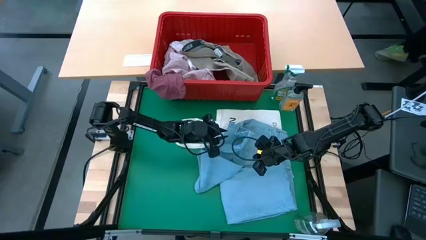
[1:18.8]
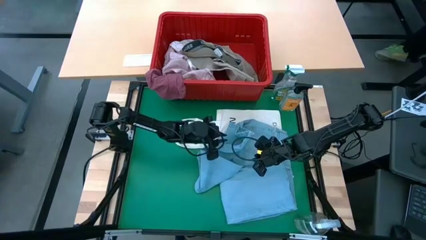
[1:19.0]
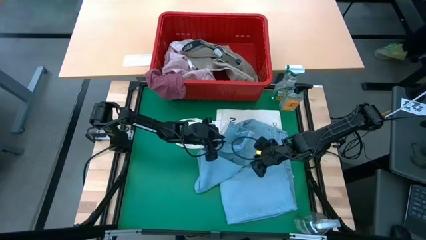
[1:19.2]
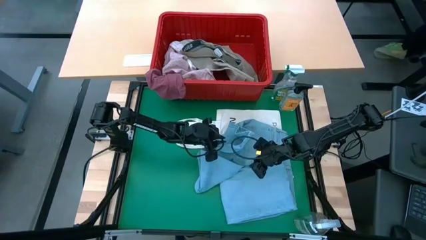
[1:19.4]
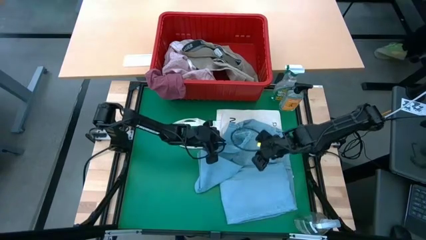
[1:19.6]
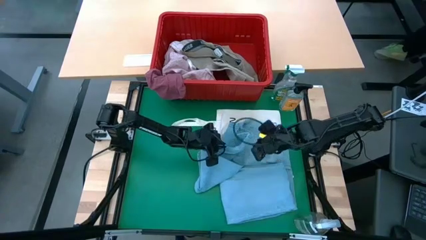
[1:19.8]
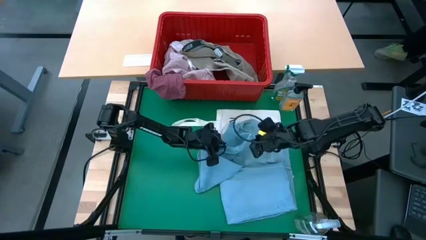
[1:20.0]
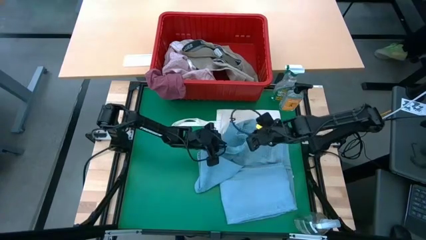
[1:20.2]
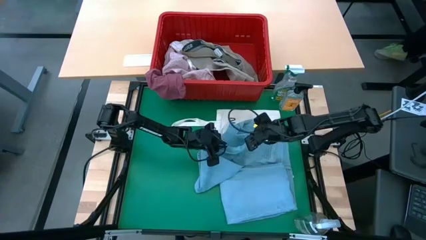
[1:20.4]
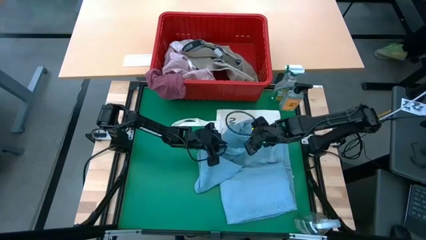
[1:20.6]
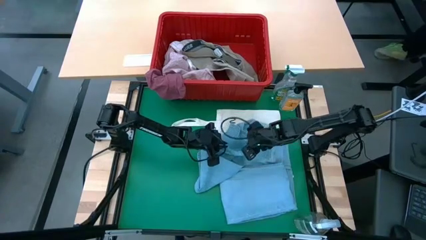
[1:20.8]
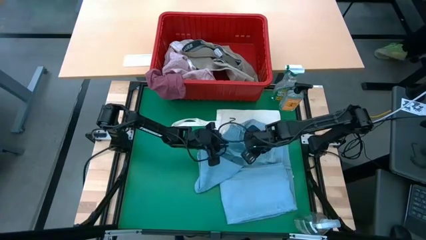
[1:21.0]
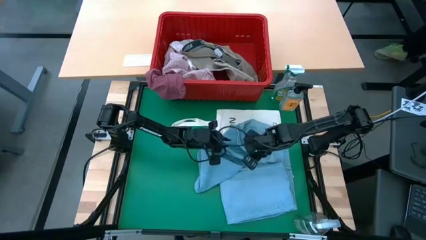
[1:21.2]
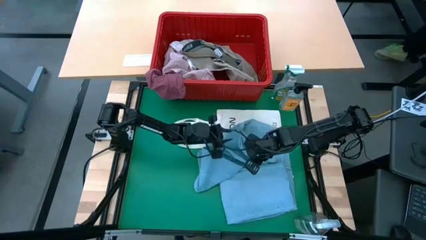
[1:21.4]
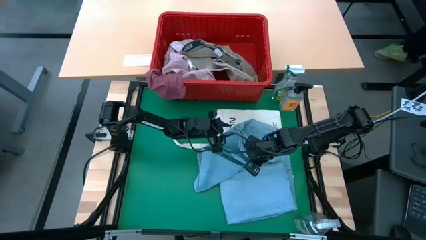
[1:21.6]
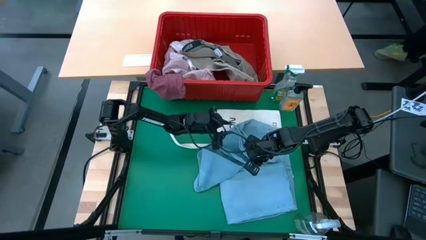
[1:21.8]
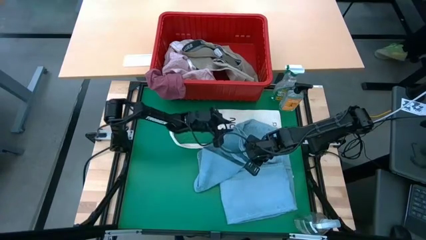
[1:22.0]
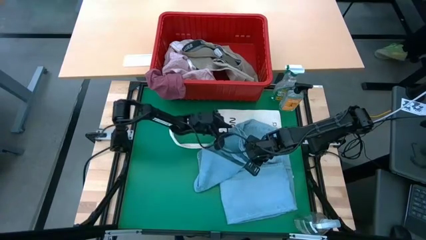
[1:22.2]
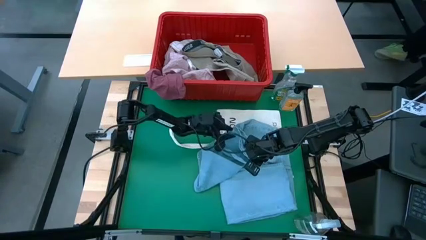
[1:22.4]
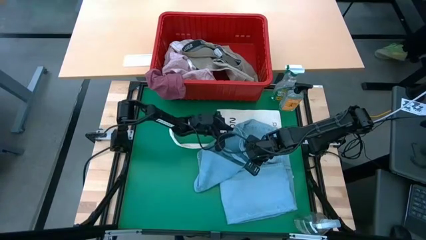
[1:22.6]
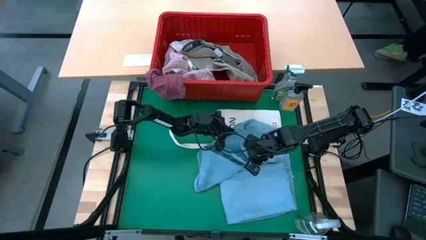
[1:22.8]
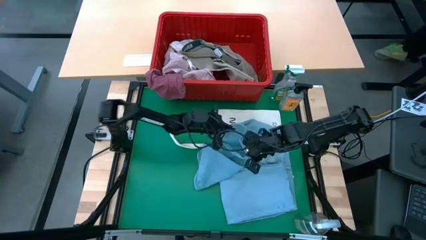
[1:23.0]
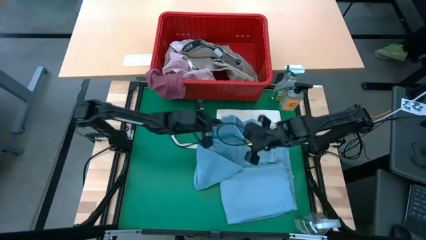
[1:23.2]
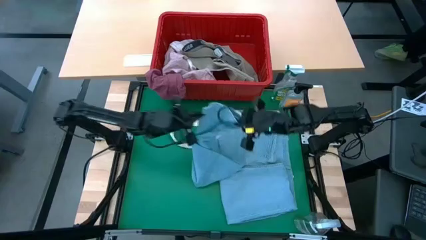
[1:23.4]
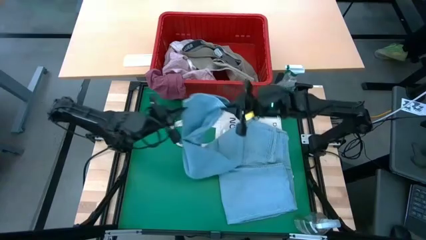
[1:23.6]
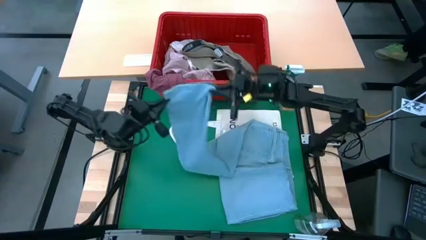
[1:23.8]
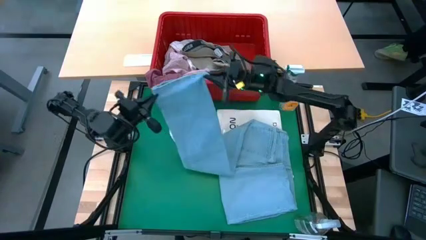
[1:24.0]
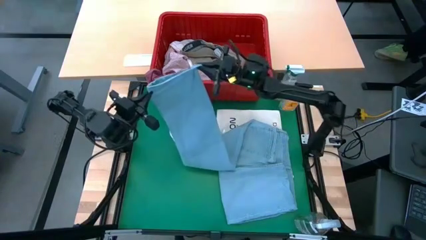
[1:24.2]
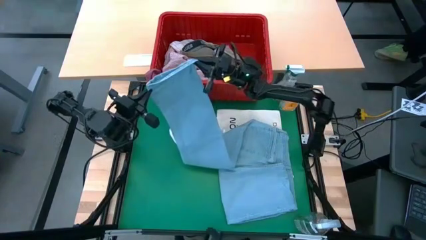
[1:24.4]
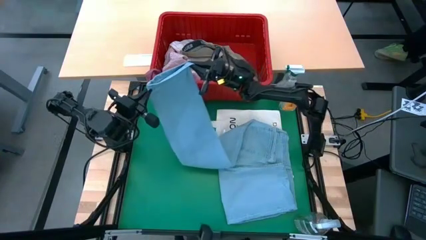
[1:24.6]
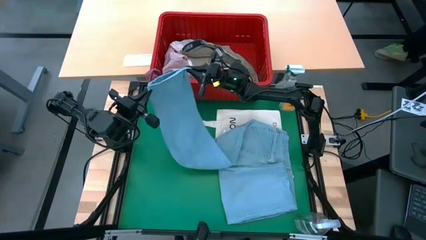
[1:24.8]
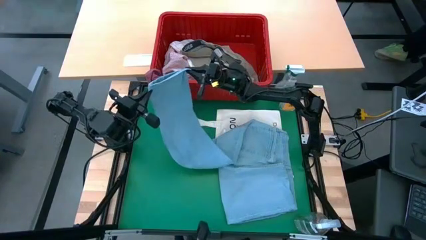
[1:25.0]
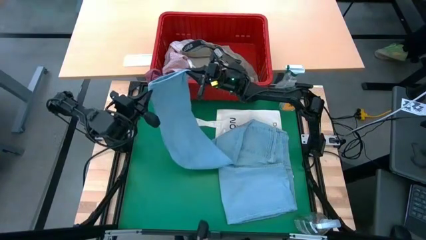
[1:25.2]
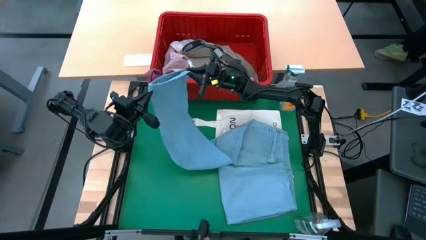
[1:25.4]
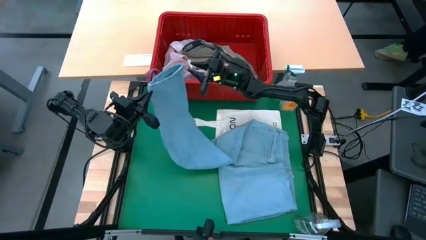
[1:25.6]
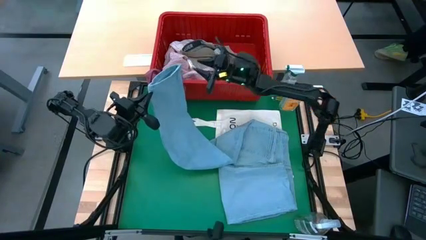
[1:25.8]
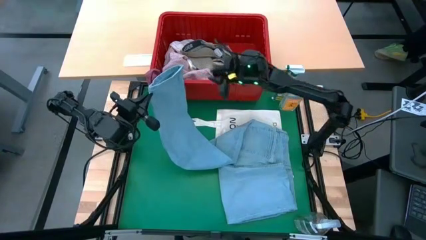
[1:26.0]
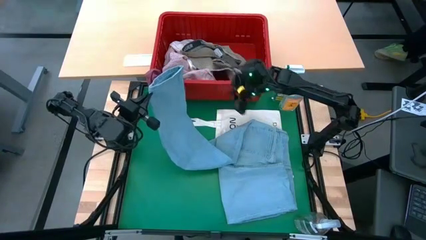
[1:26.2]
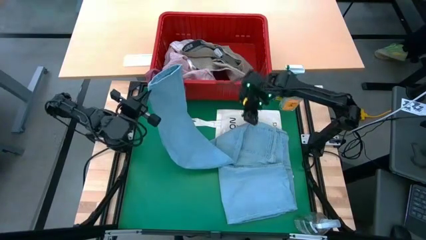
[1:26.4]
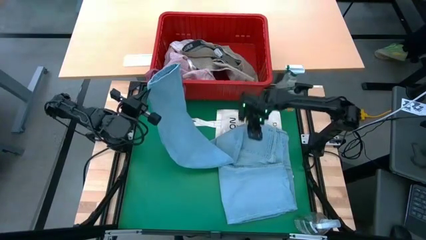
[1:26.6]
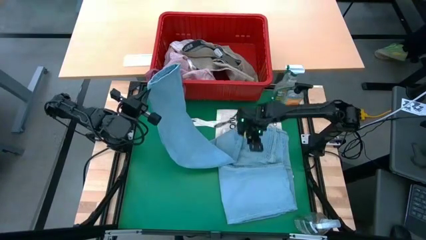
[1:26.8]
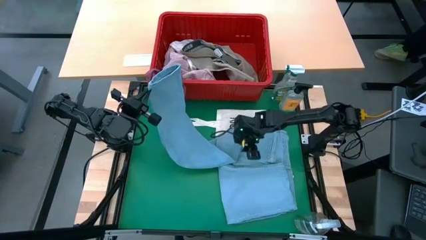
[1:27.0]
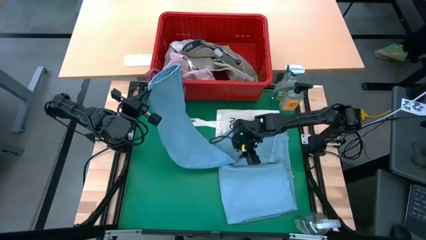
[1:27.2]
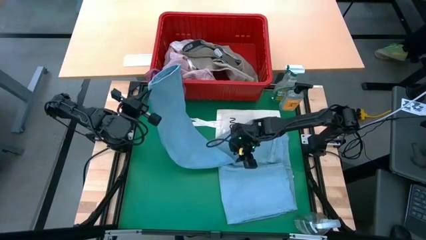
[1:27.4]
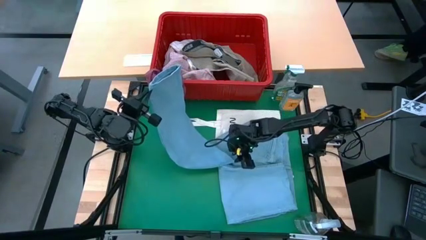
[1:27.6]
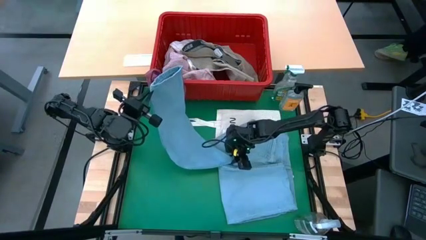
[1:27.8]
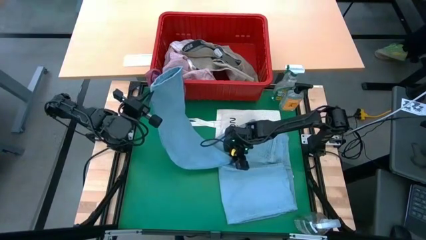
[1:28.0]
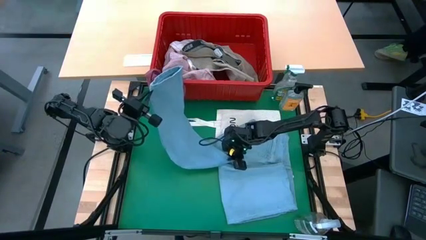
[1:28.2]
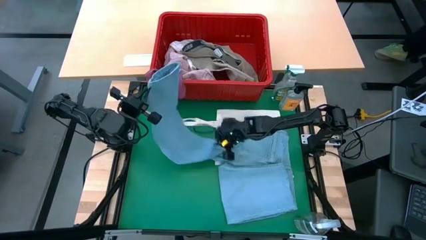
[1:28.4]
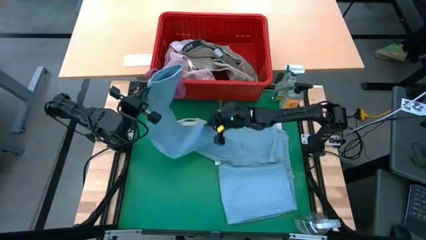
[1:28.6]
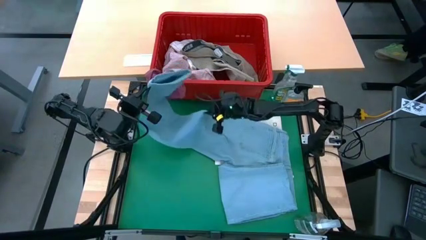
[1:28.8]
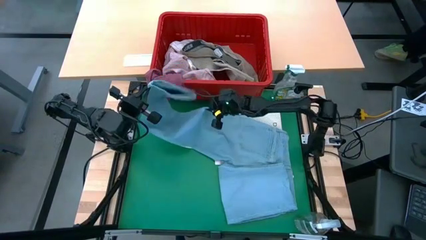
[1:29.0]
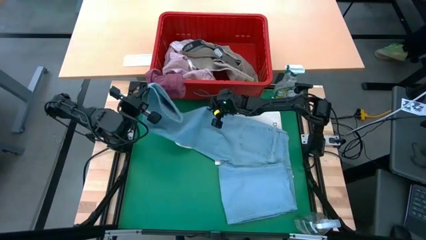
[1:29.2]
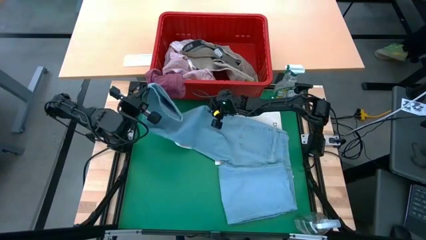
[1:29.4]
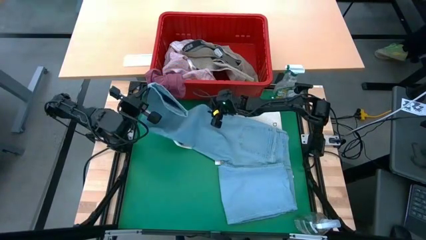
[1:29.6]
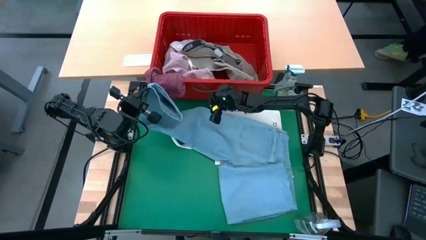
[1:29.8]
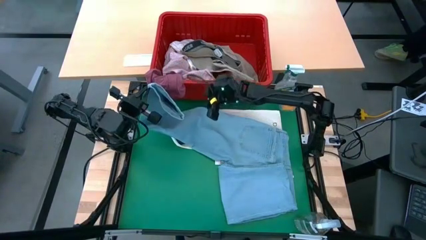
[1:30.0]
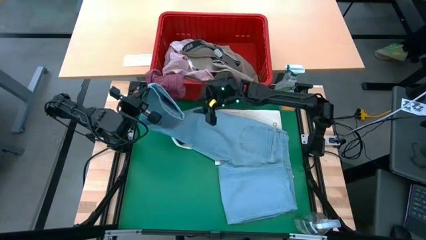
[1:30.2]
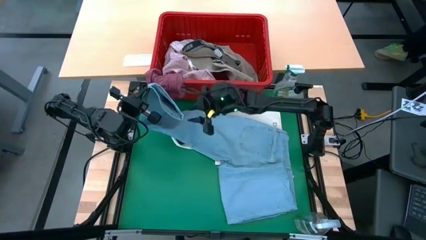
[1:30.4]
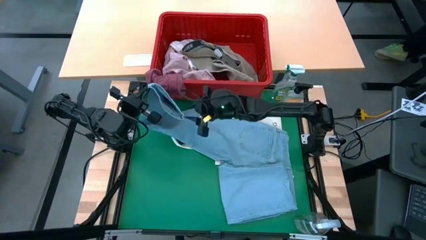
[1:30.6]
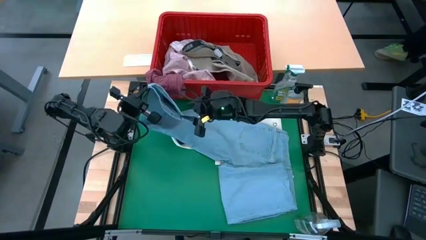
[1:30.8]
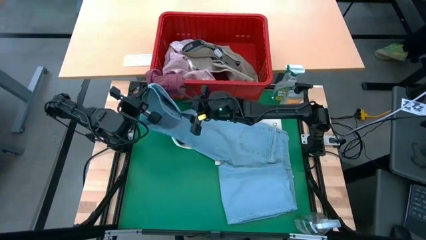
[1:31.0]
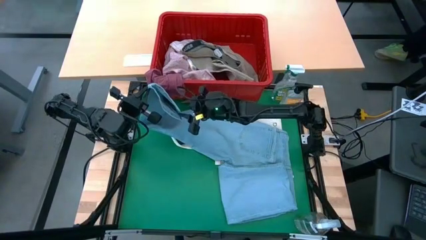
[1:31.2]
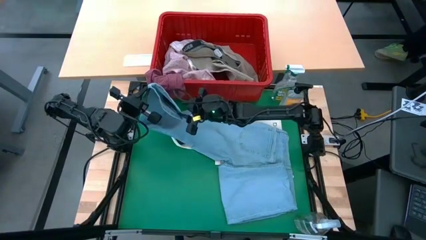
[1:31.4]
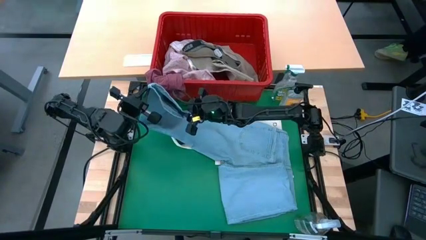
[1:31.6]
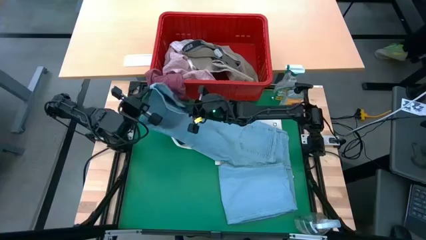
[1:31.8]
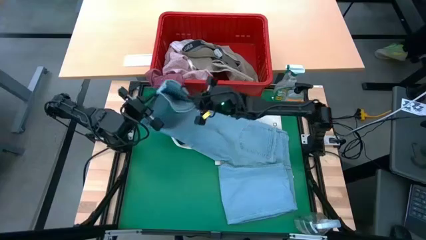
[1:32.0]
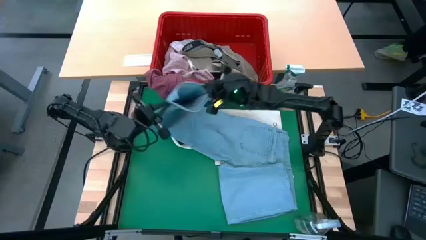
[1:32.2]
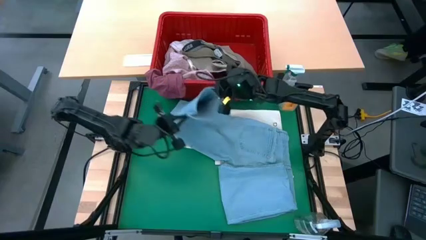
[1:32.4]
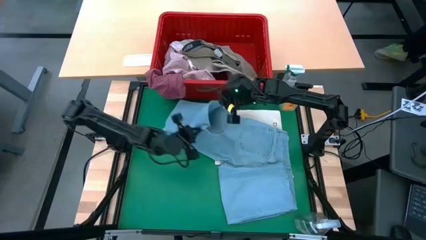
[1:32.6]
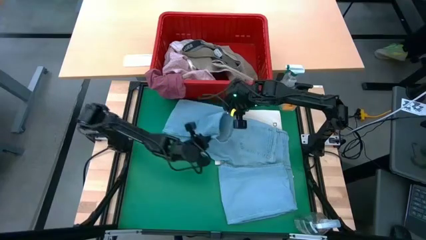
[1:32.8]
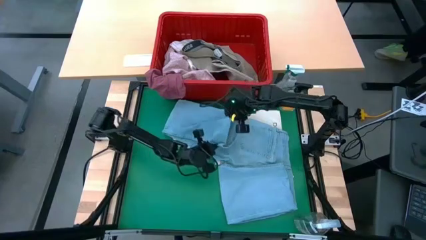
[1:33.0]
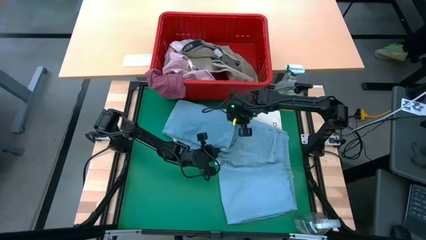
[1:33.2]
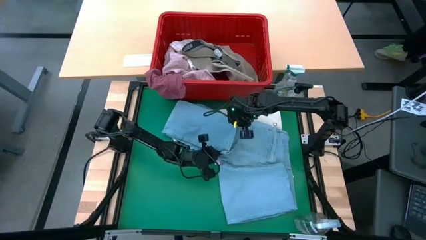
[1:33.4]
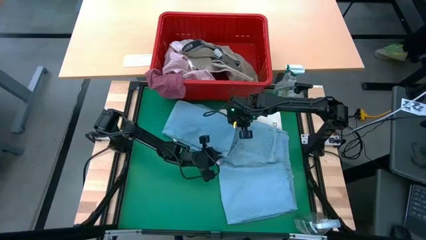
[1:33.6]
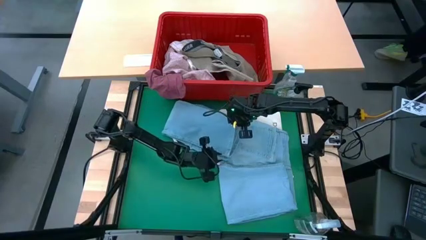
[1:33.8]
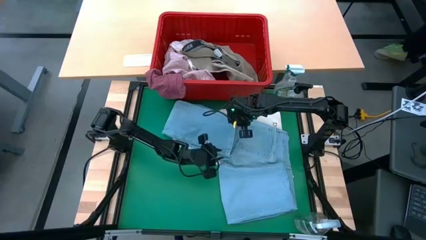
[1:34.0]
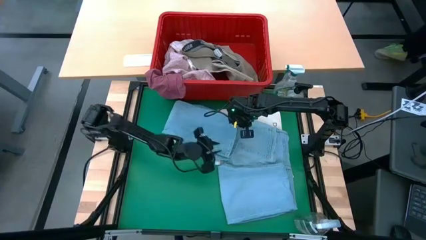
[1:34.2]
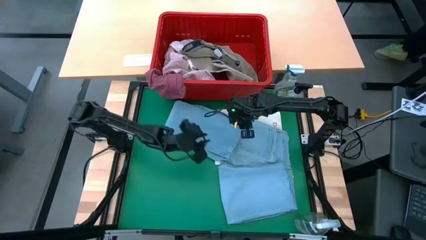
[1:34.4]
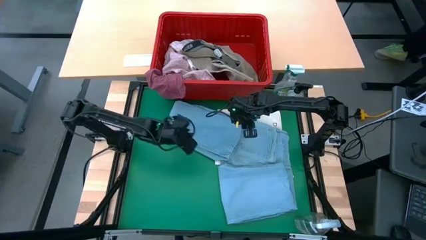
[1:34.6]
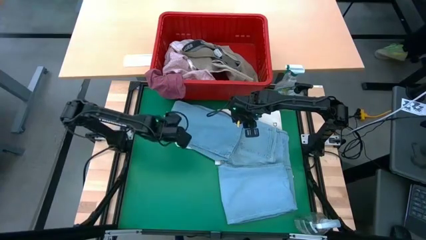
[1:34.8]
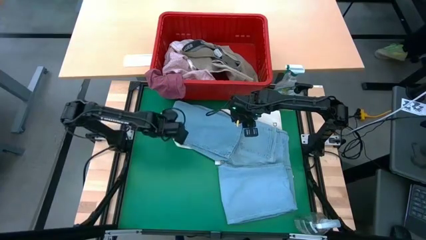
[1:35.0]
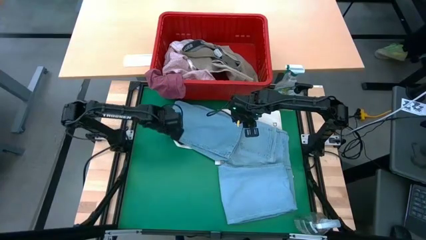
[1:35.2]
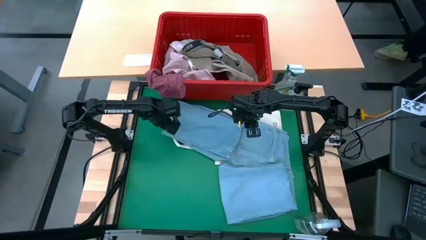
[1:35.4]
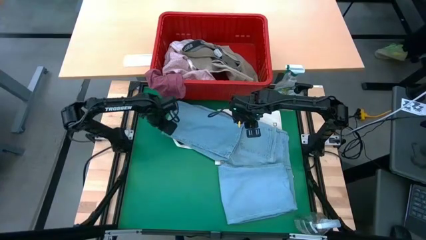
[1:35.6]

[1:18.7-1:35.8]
Task: Fold Laundry from Bin
Fold the blue pants from the red laundry basket
